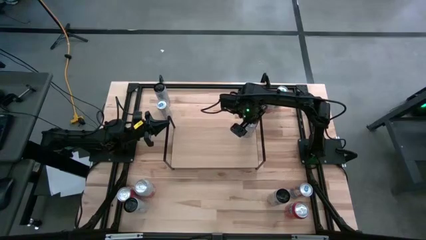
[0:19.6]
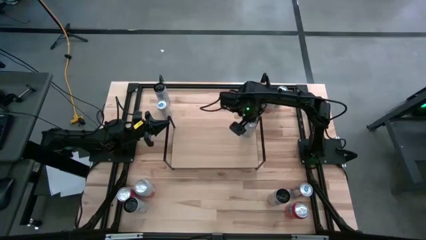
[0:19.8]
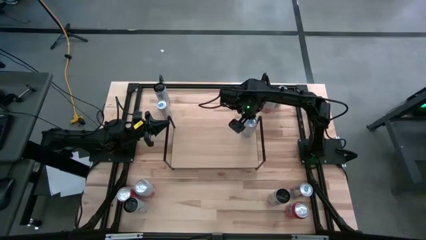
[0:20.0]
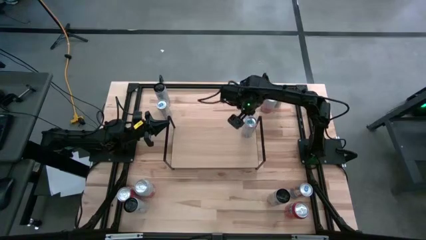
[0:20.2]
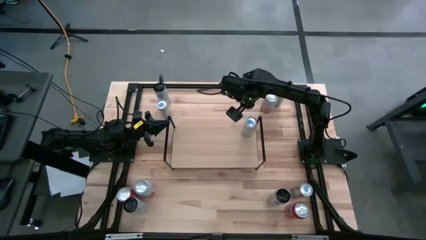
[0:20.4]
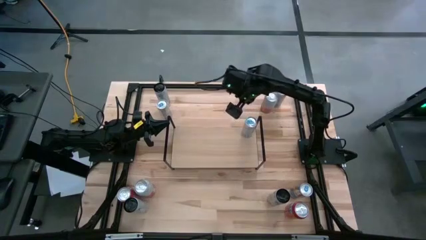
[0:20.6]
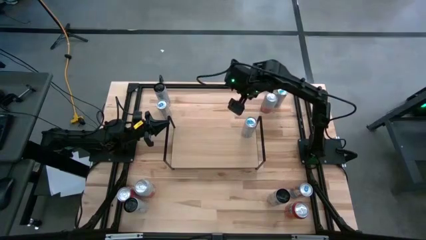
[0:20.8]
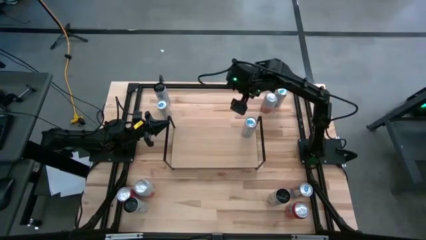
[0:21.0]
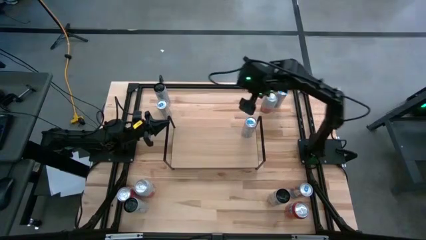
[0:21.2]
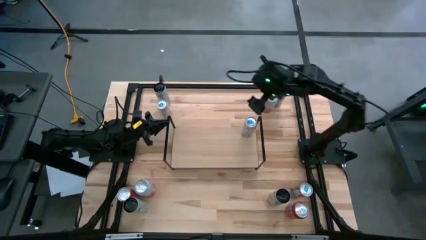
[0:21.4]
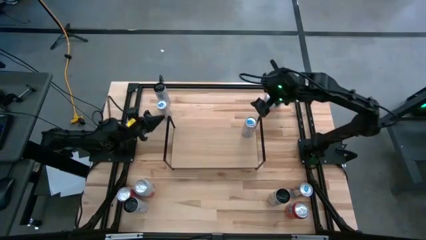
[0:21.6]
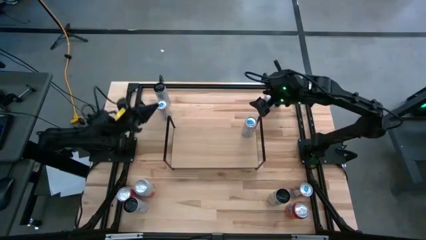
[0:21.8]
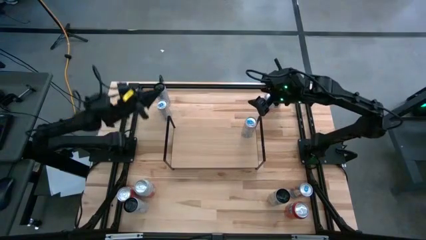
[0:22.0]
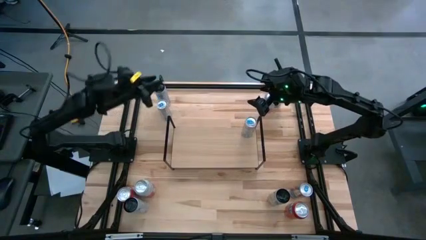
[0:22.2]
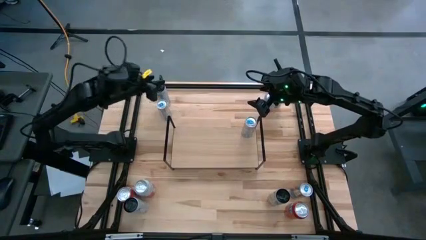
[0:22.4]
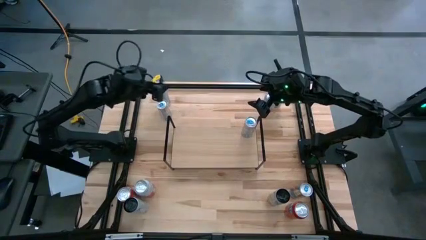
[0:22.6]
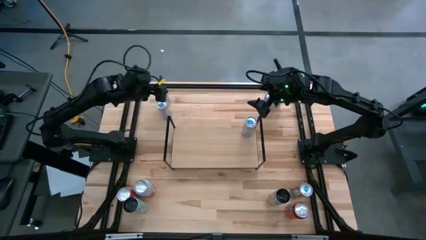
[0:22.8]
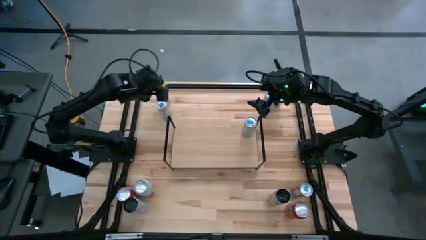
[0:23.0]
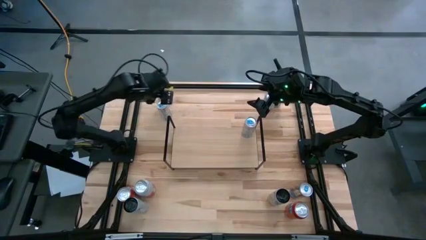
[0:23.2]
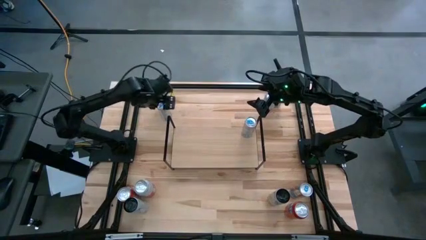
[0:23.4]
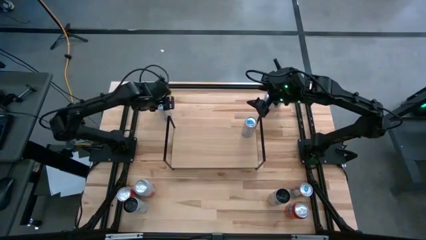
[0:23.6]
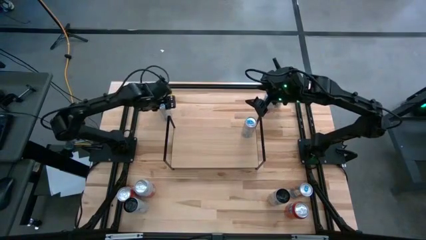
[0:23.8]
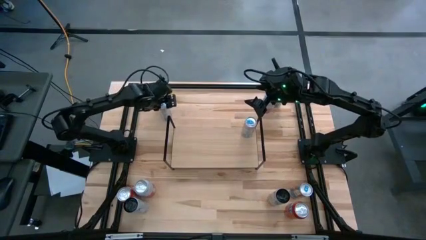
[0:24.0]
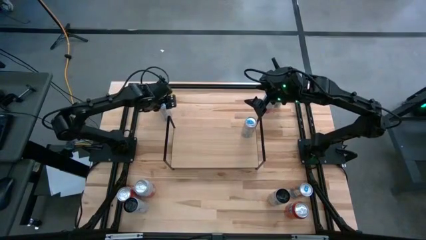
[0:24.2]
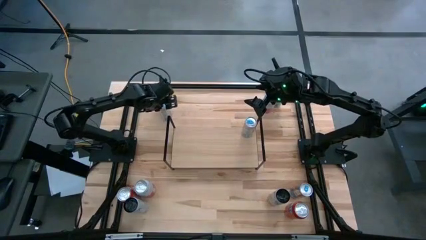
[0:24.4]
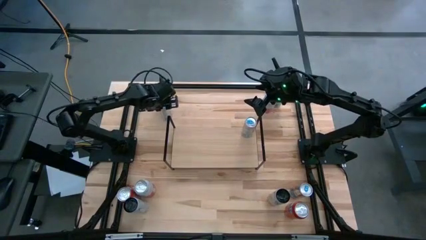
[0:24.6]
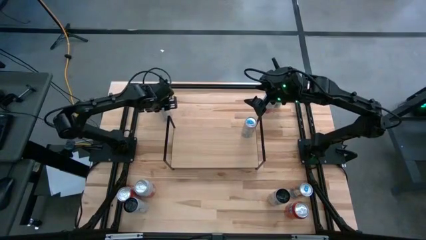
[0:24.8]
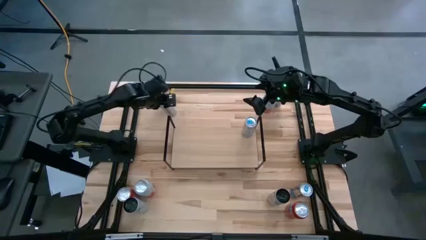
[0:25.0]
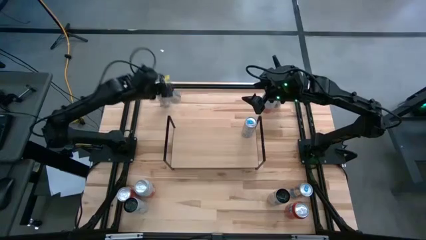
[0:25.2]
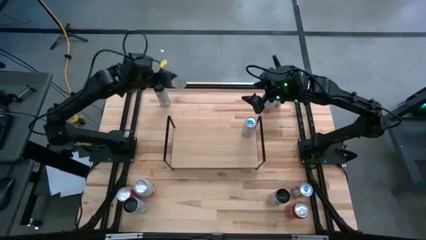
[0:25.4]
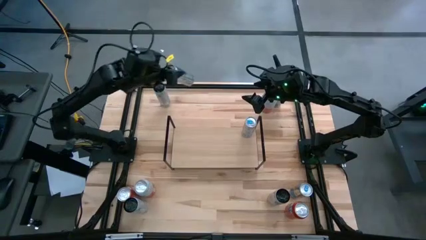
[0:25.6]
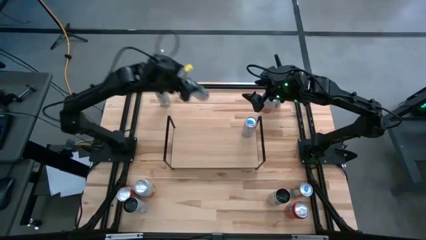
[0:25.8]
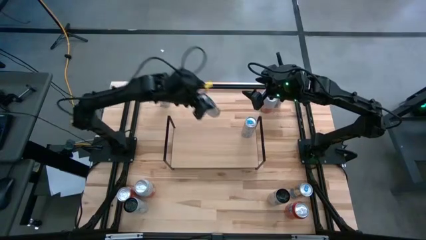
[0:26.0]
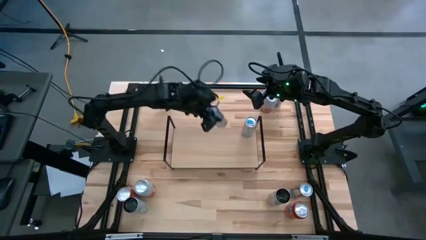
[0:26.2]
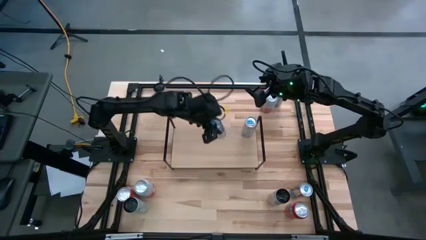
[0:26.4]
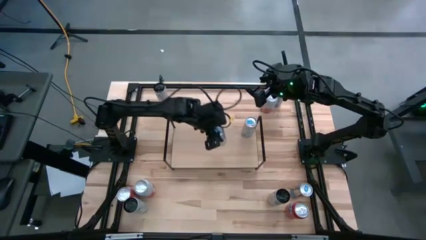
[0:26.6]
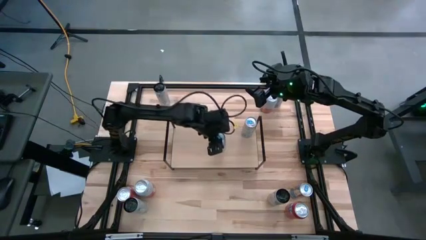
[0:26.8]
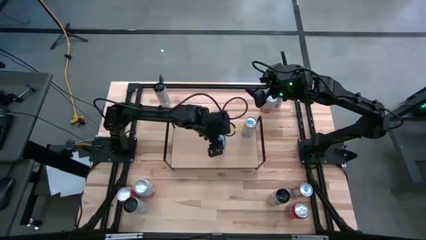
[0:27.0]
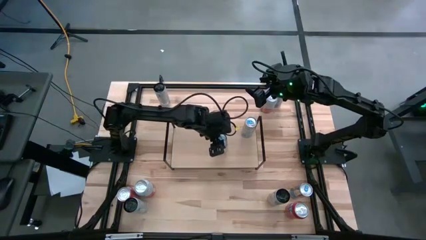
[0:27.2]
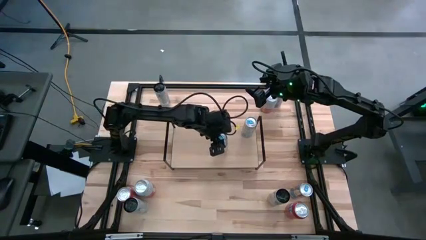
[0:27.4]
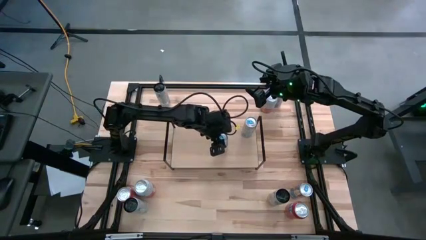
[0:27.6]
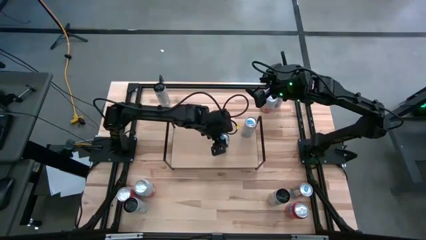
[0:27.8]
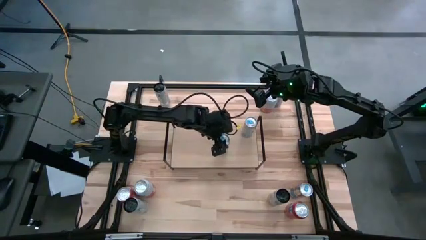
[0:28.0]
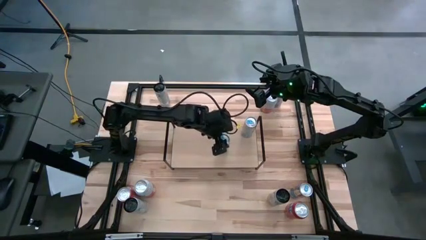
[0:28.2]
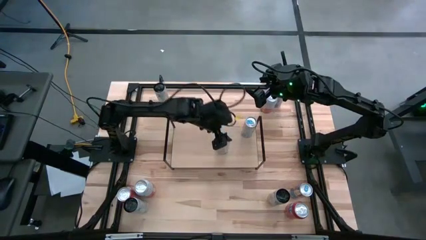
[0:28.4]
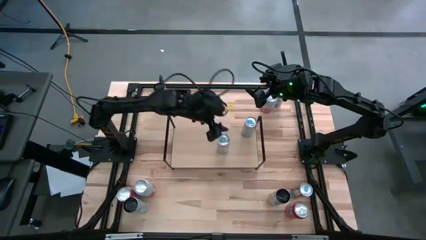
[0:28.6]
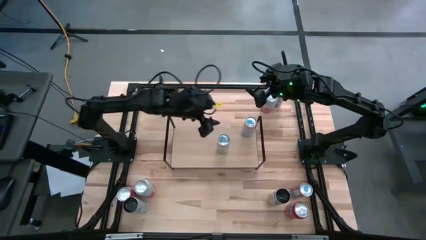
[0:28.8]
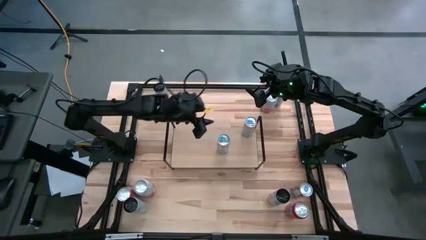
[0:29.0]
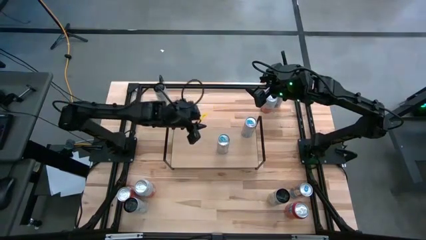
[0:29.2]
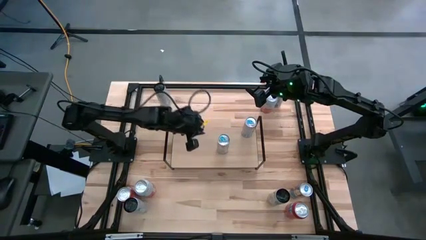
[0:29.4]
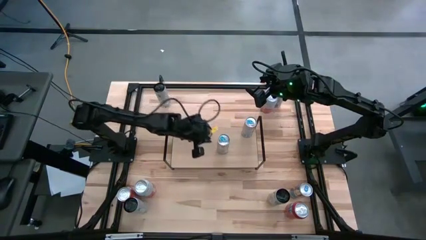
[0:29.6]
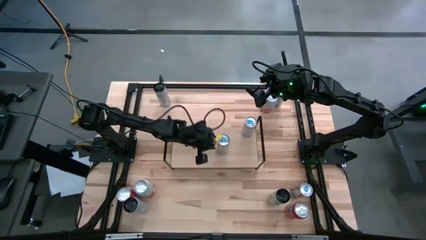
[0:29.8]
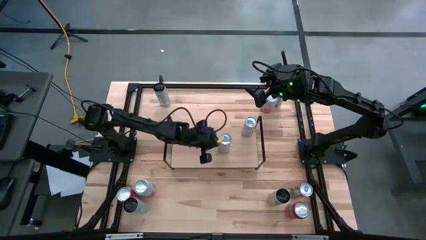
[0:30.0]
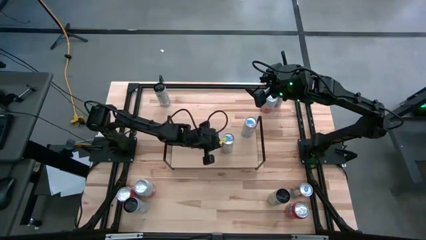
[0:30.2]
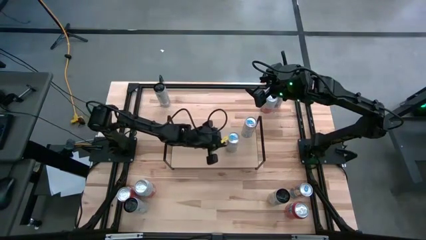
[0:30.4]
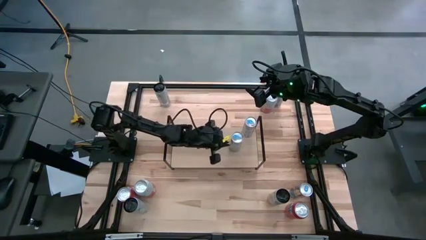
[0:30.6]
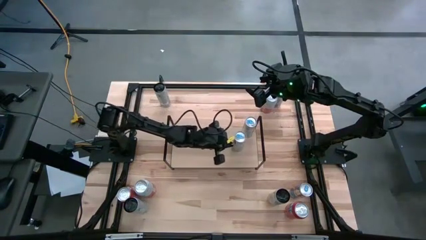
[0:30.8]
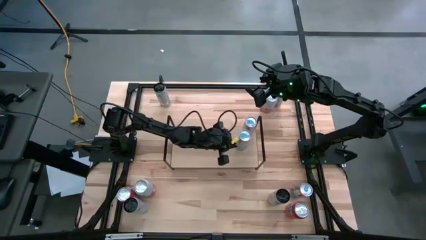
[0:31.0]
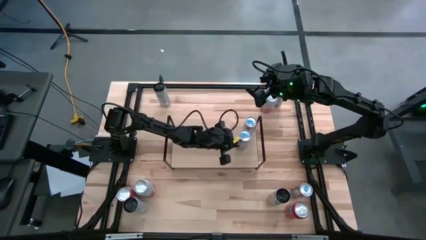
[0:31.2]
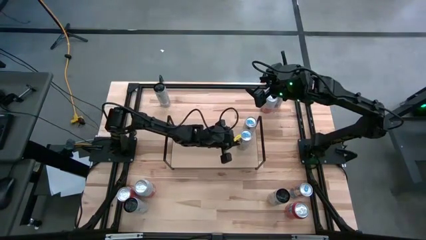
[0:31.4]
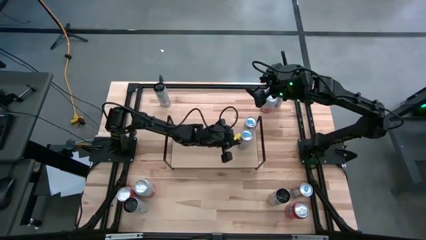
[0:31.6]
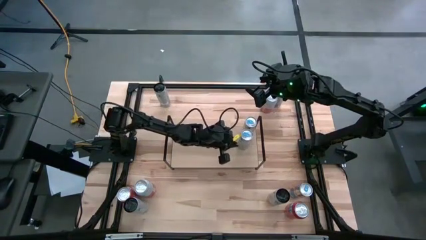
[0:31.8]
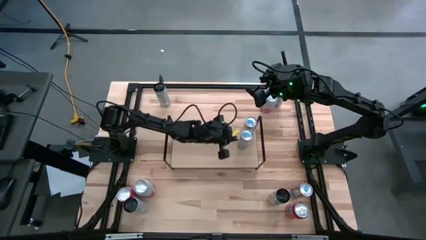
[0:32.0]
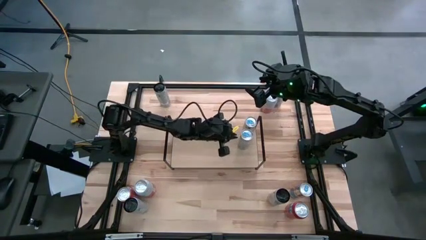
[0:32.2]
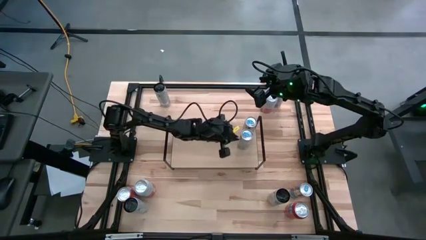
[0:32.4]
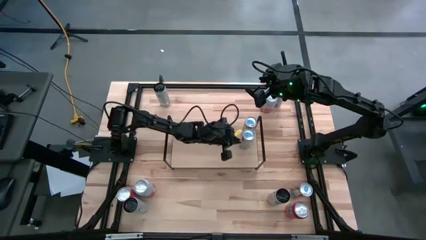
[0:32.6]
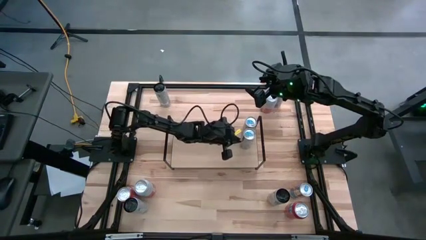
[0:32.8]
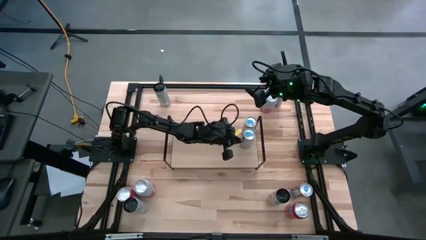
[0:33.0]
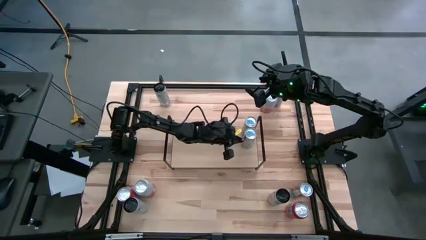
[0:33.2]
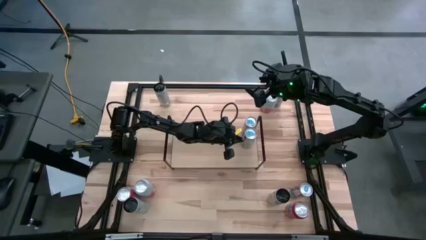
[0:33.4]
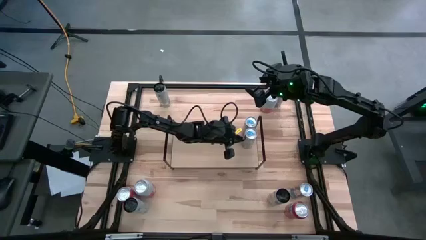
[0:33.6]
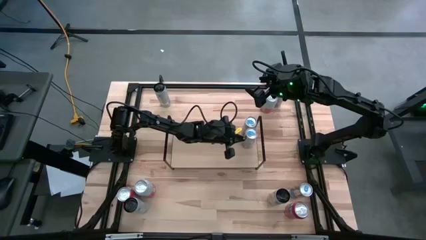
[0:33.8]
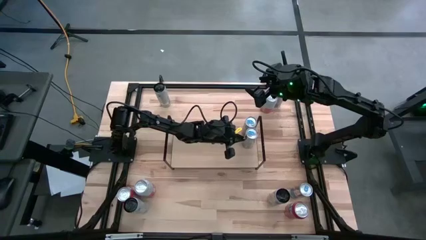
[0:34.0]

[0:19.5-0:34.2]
Task: Place canned beverage on shelf
Put the blue soda can aligned with the other blue soda can on the shelf
